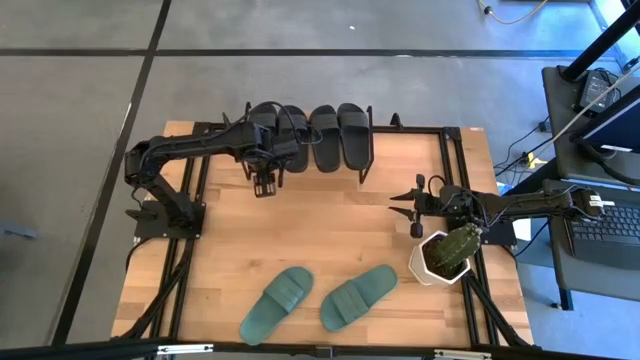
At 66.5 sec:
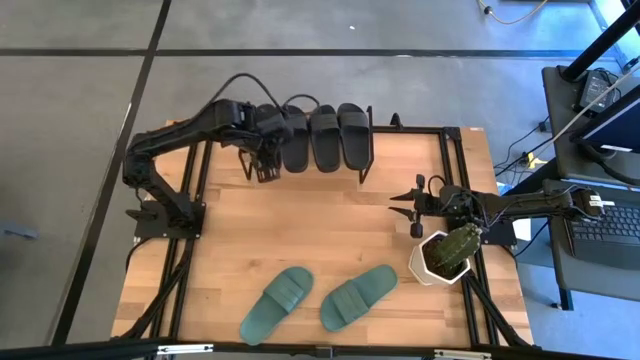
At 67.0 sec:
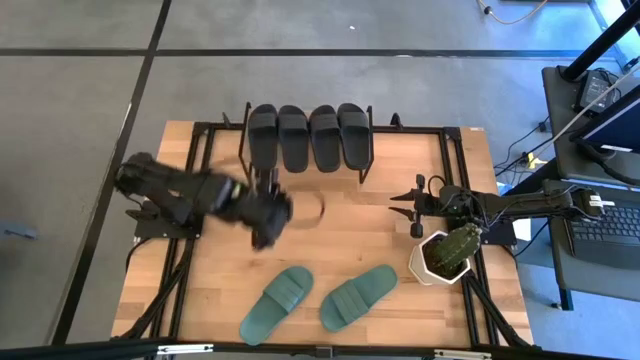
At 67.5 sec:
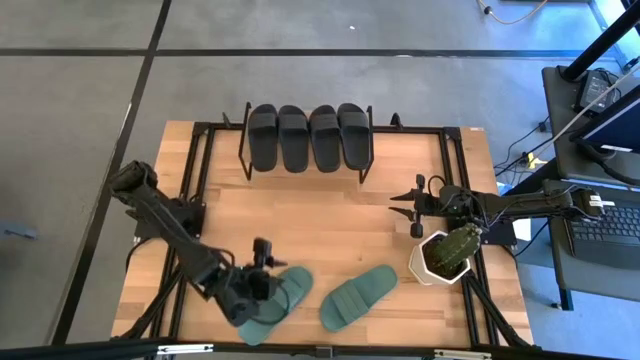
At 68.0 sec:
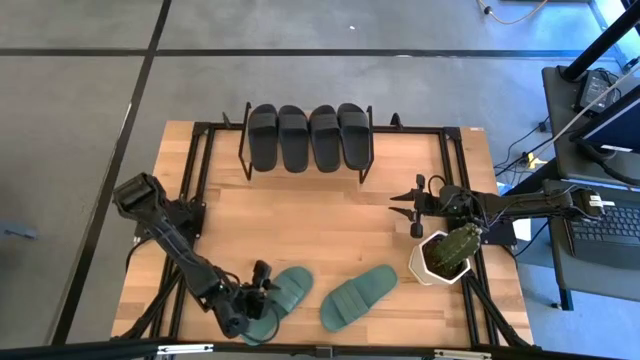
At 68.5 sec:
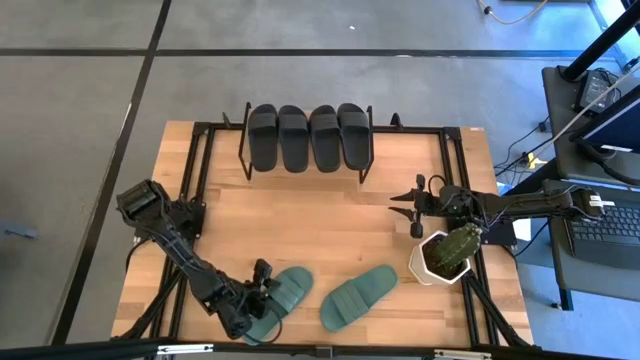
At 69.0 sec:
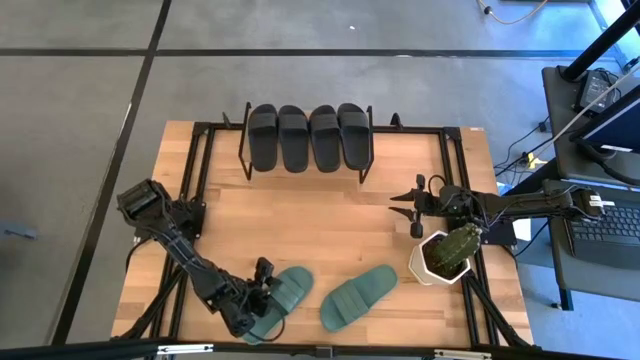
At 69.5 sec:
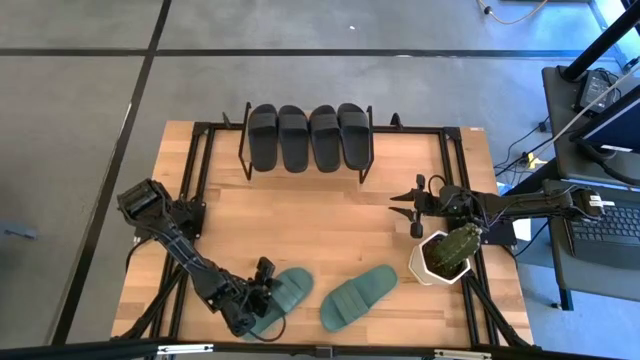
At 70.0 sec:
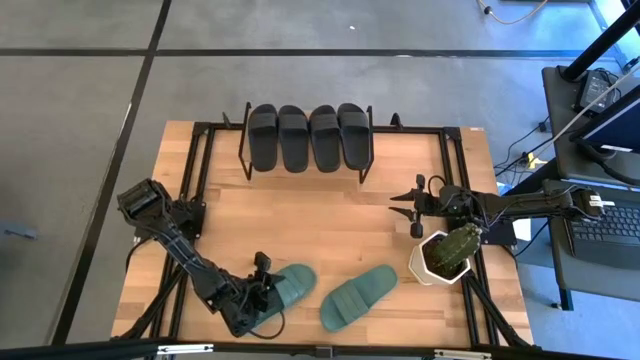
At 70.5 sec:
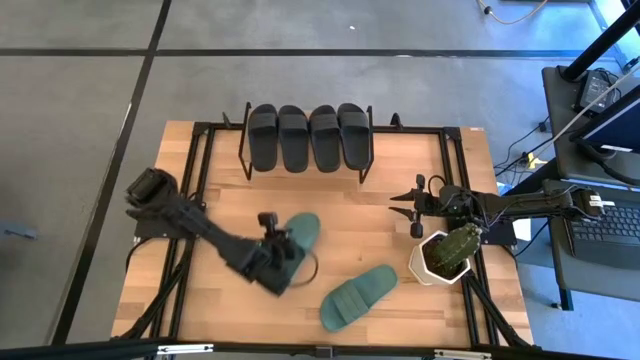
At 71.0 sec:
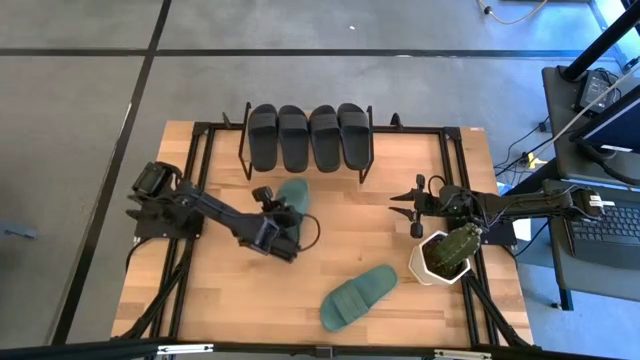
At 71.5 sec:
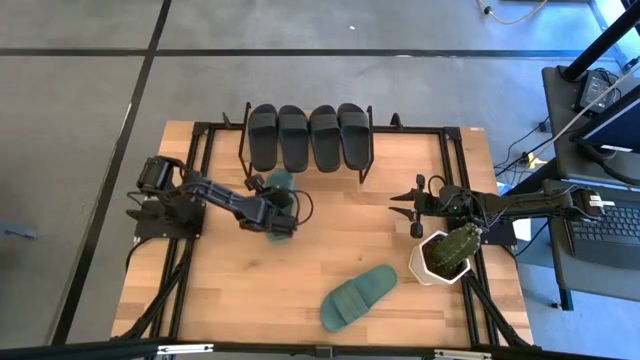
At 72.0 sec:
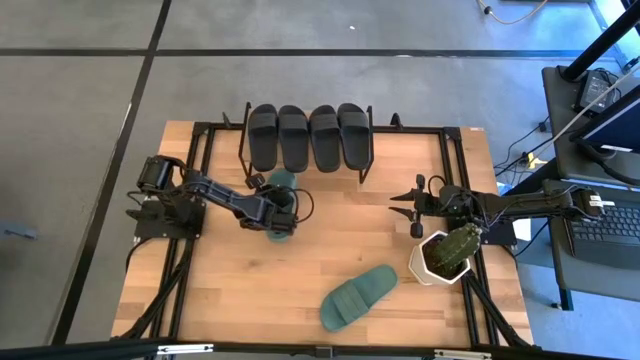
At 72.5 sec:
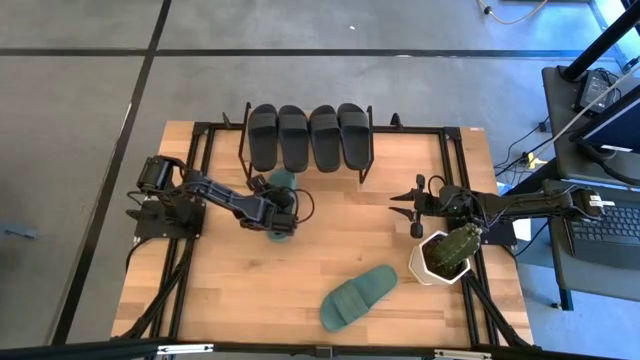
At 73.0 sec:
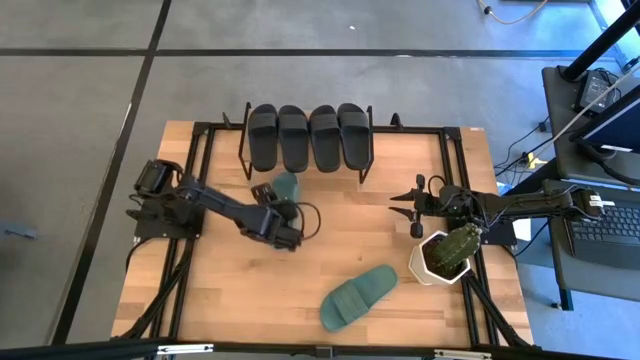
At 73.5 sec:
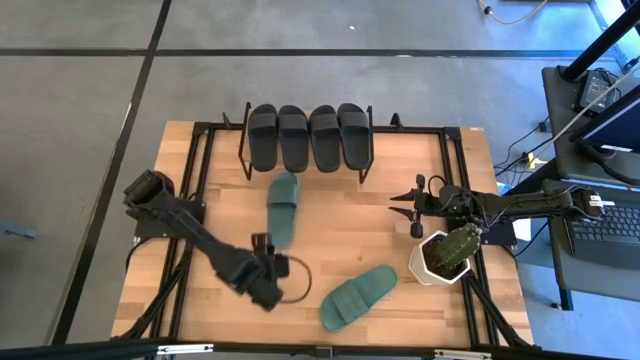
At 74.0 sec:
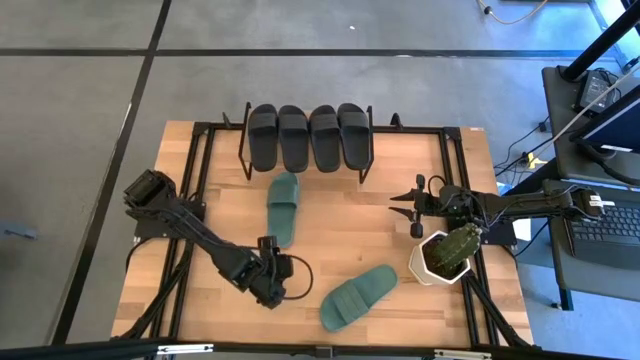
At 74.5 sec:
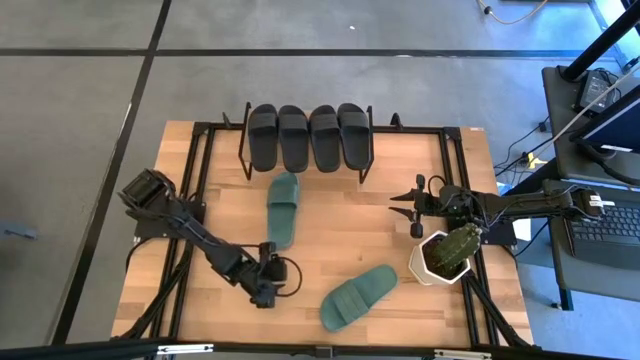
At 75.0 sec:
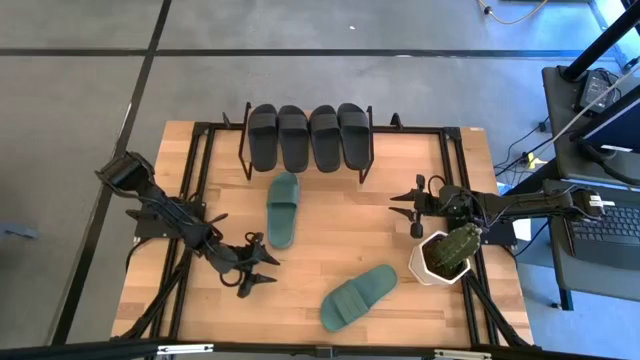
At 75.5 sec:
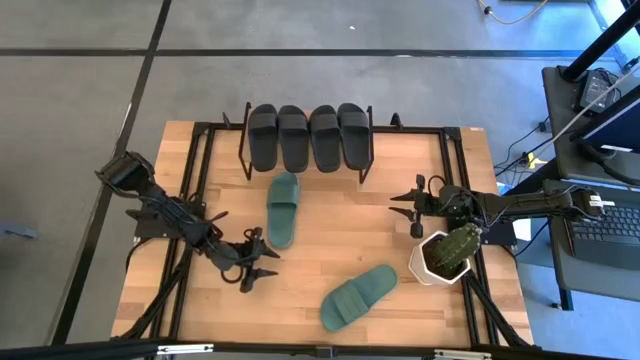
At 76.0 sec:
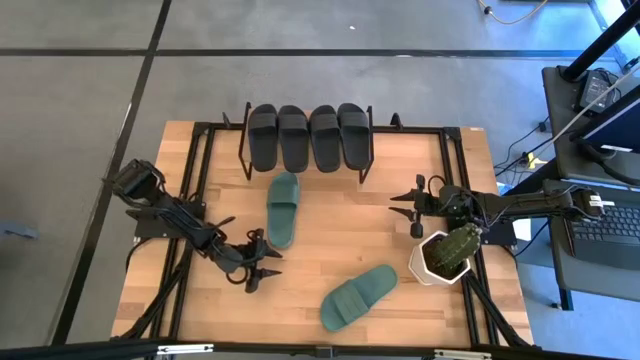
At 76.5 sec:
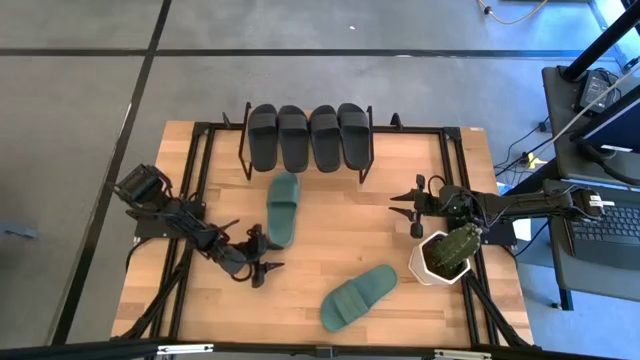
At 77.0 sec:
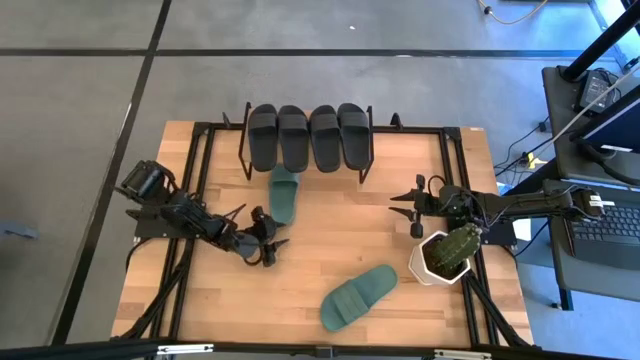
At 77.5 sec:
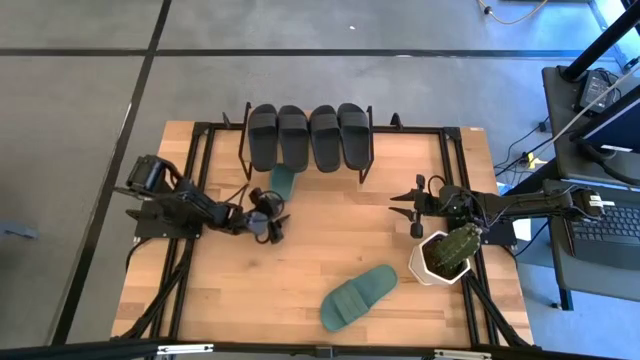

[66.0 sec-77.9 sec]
Task: Pick and place slides into the shelf
Put the green slide under the shelf
